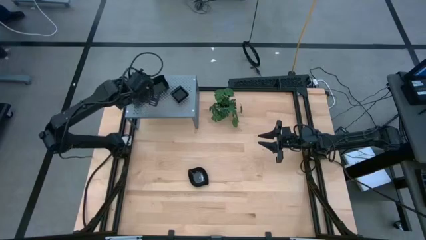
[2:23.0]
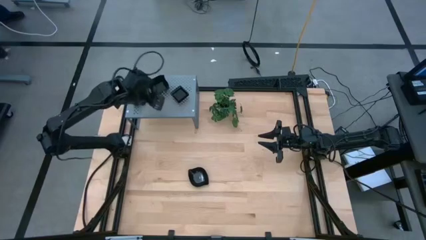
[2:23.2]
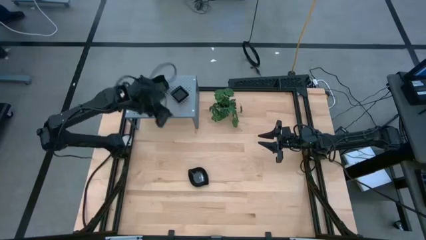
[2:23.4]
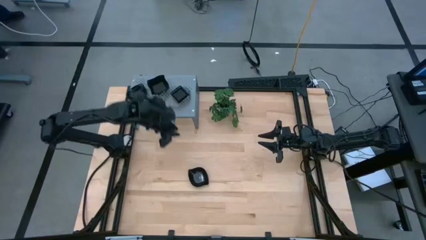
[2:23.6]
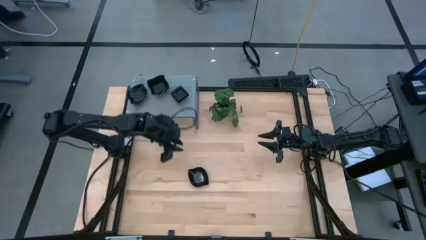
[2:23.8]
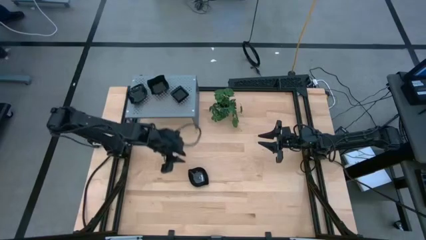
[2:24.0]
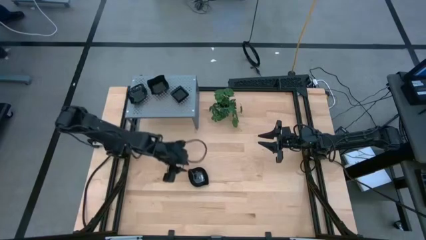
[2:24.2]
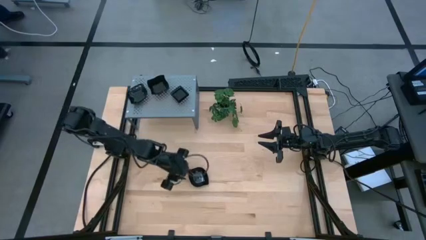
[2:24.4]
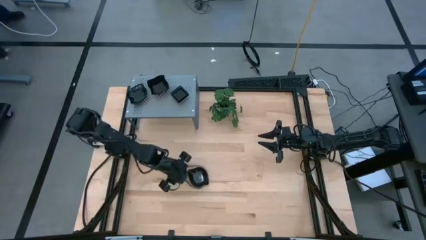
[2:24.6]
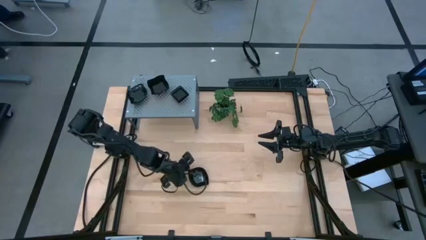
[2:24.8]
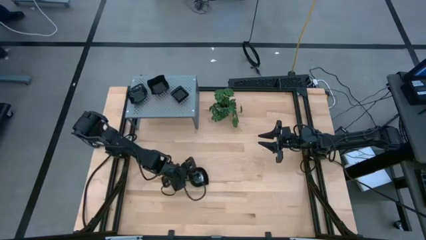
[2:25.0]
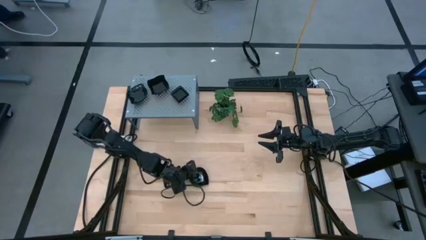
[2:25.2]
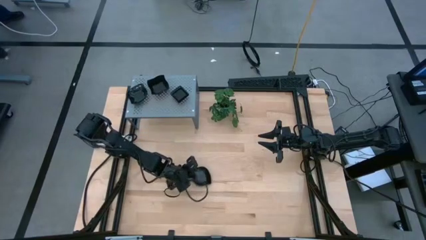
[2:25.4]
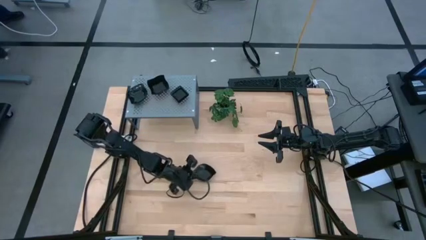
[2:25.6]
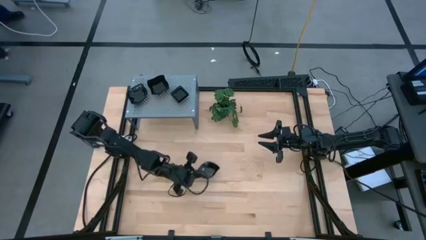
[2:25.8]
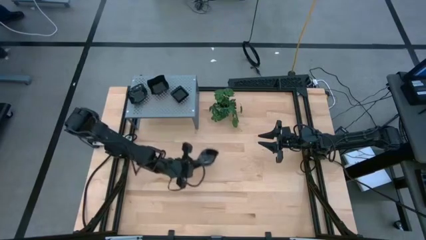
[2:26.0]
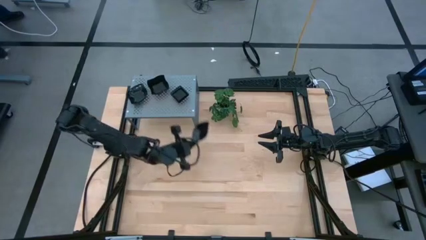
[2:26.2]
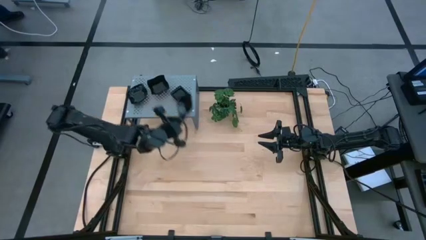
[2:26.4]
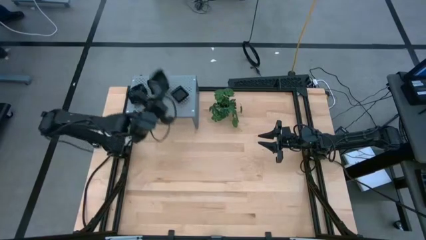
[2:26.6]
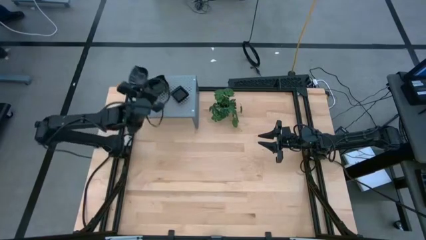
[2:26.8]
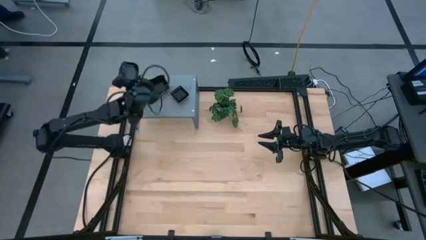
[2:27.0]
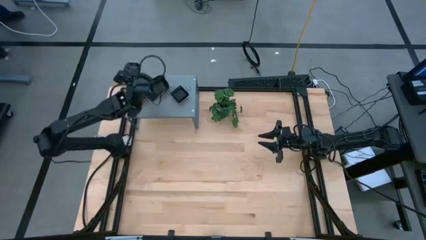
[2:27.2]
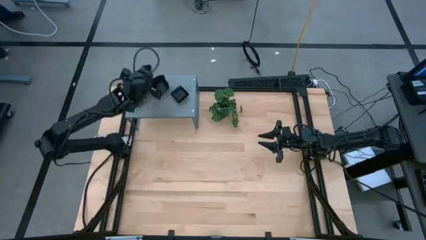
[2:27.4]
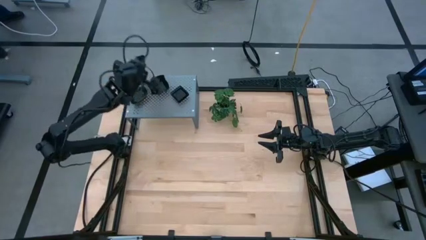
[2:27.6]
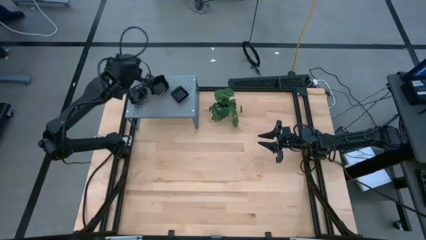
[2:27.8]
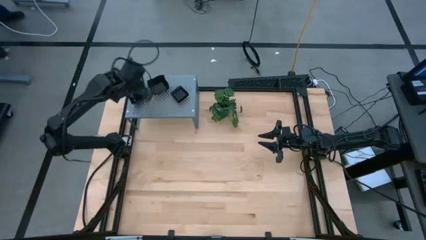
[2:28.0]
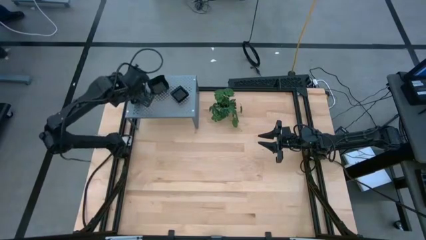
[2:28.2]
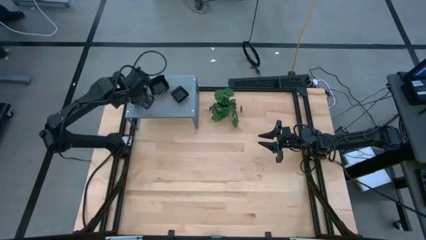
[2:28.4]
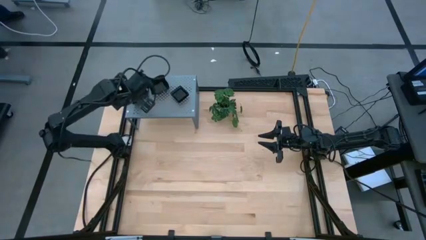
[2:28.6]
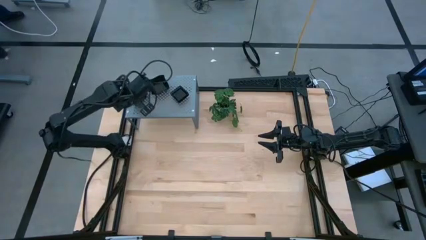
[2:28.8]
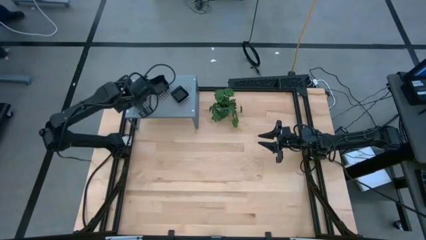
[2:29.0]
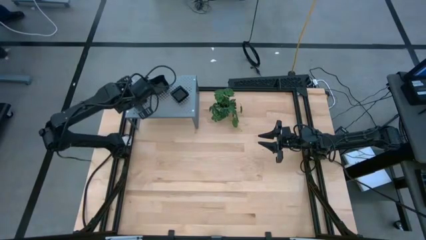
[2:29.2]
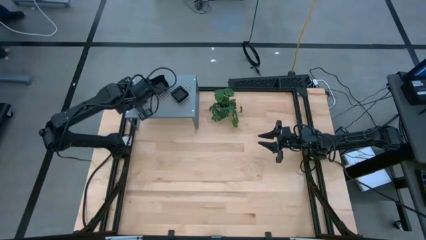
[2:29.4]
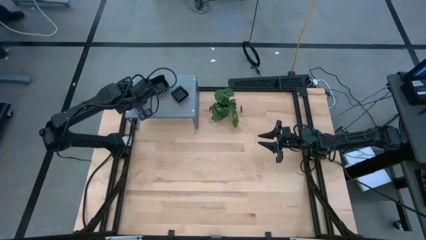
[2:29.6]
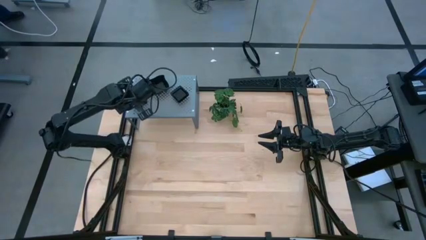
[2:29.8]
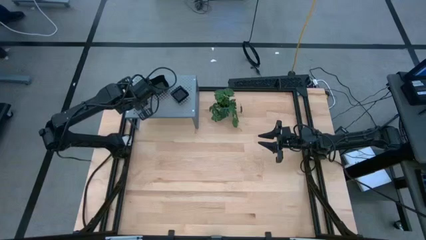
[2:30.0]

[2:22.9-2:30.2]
Task: Pick & Place Mini shaped plates
Stack the black leaf plate on top of the black leaf plate on the shelf

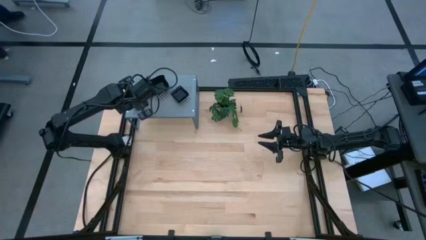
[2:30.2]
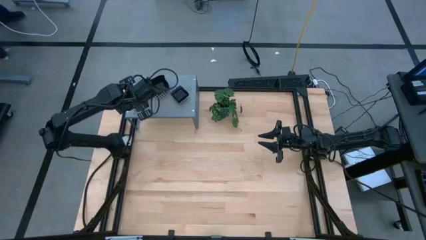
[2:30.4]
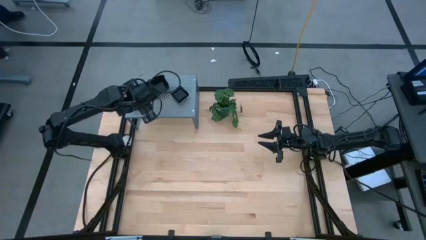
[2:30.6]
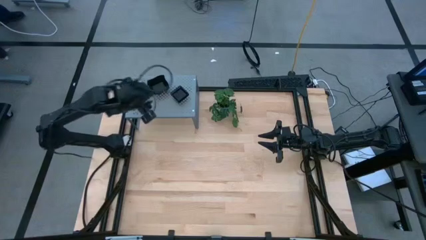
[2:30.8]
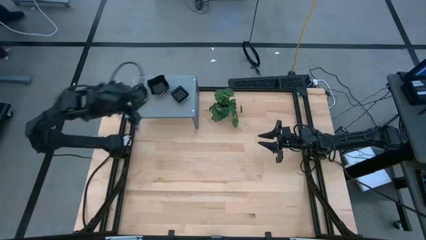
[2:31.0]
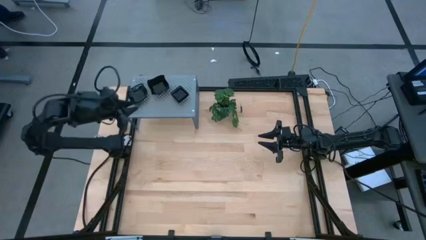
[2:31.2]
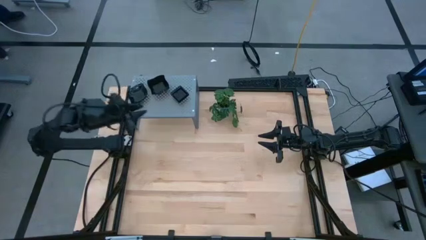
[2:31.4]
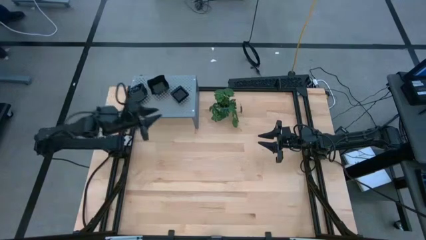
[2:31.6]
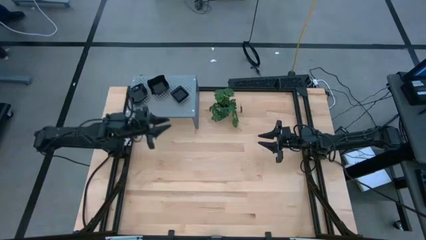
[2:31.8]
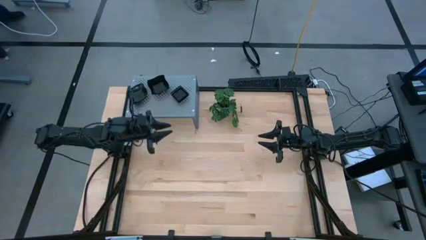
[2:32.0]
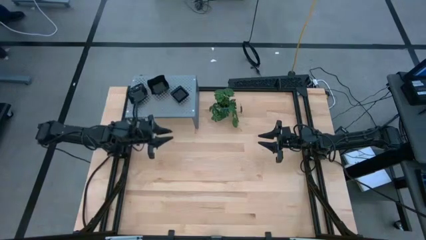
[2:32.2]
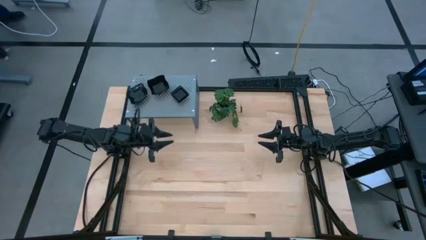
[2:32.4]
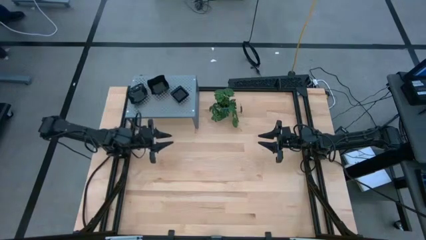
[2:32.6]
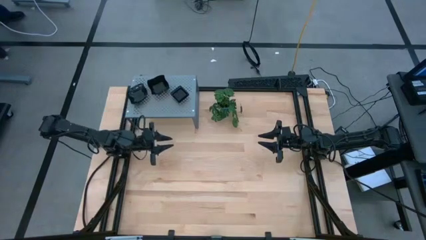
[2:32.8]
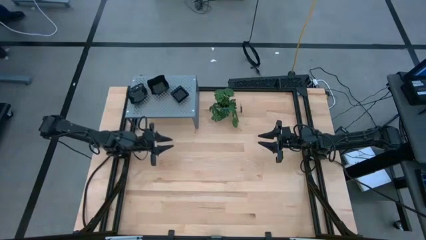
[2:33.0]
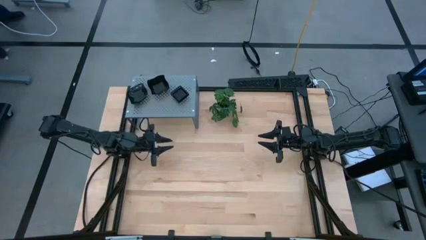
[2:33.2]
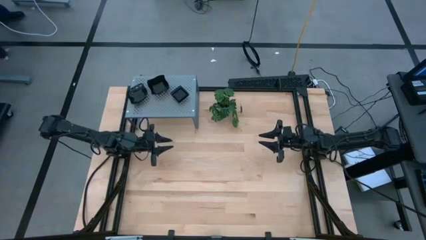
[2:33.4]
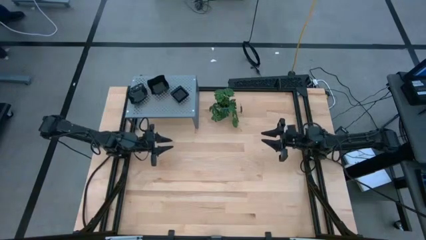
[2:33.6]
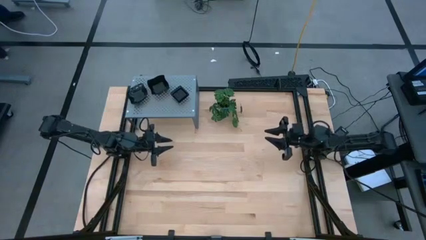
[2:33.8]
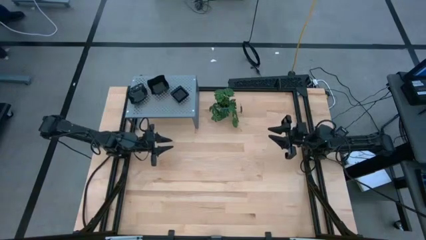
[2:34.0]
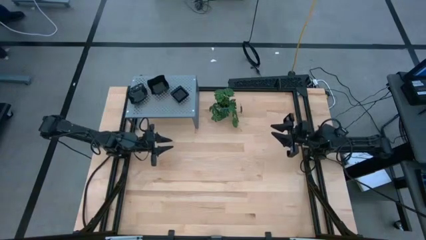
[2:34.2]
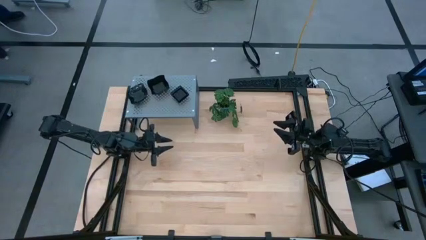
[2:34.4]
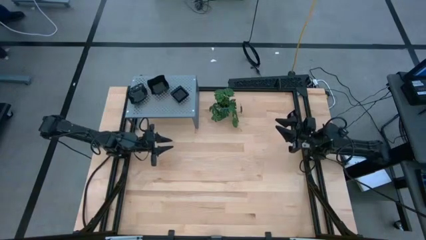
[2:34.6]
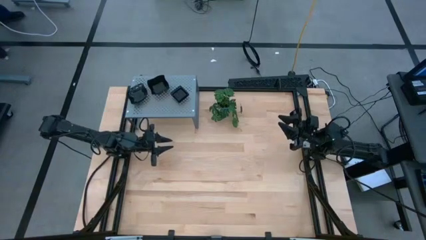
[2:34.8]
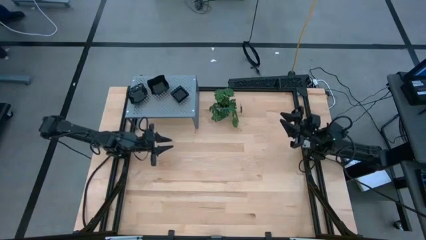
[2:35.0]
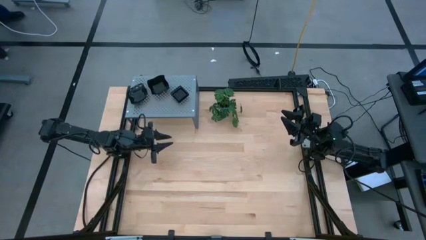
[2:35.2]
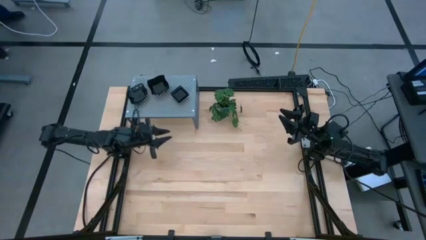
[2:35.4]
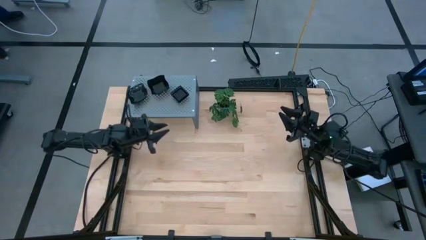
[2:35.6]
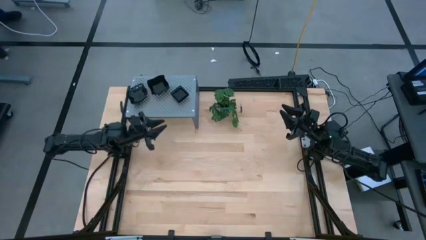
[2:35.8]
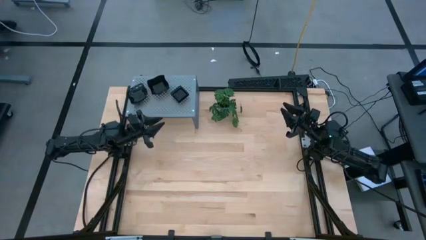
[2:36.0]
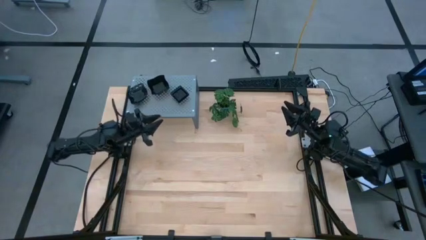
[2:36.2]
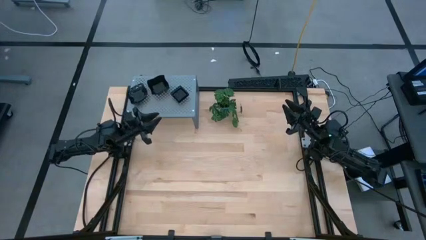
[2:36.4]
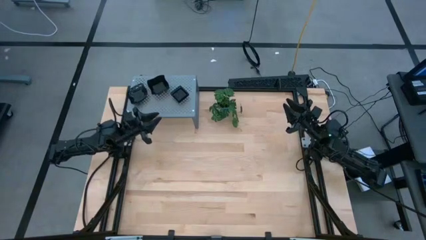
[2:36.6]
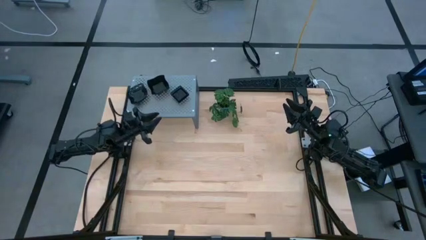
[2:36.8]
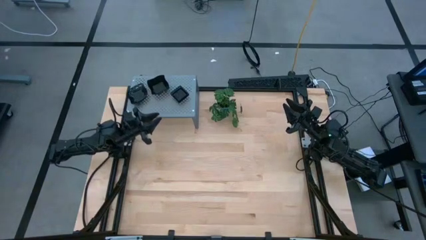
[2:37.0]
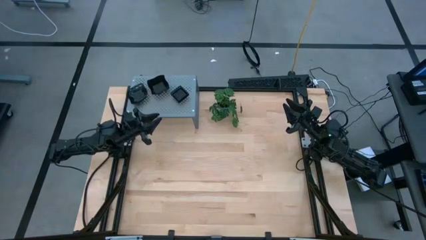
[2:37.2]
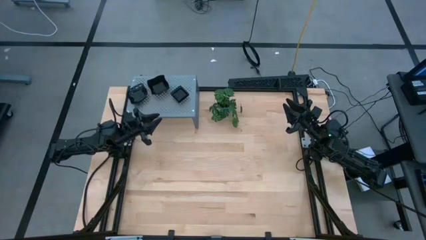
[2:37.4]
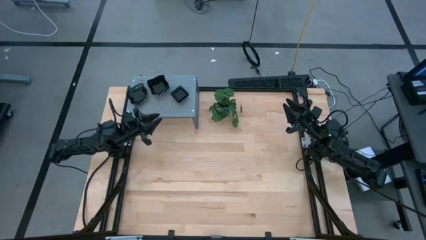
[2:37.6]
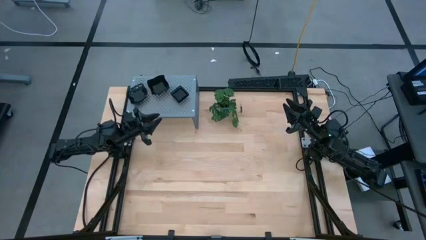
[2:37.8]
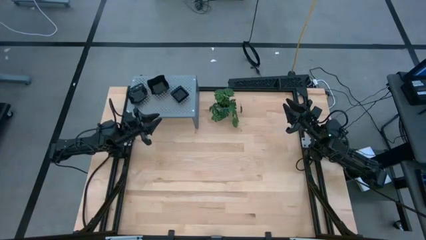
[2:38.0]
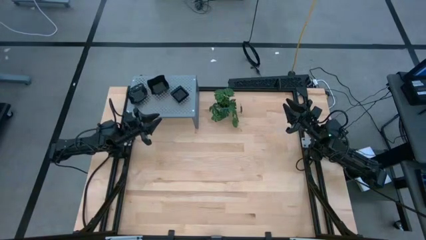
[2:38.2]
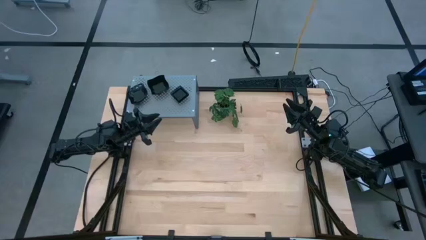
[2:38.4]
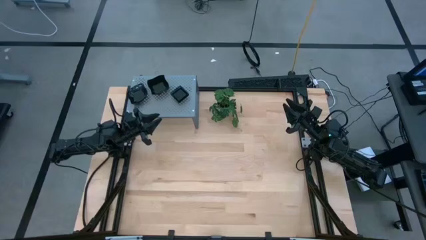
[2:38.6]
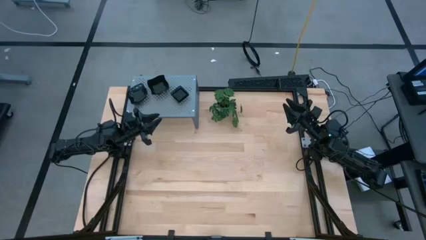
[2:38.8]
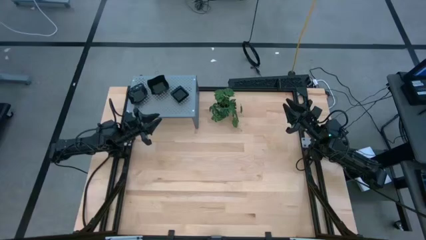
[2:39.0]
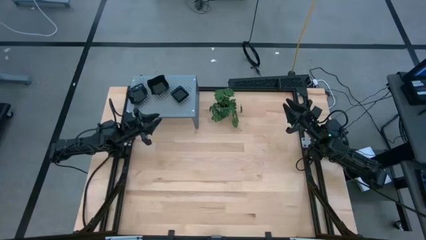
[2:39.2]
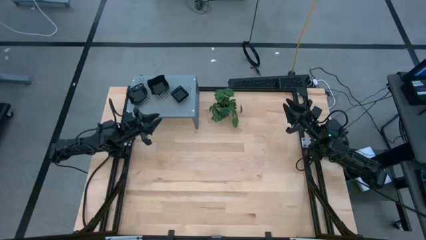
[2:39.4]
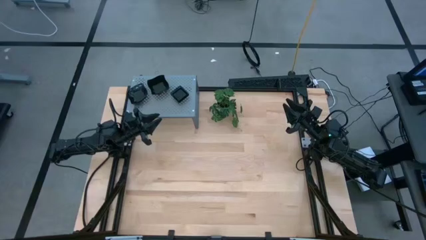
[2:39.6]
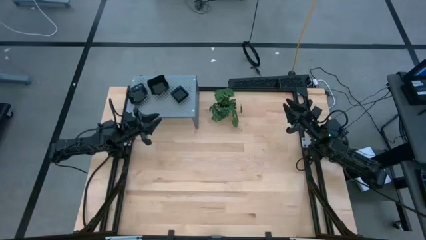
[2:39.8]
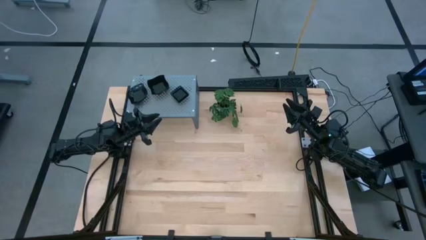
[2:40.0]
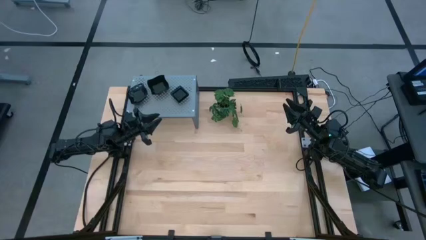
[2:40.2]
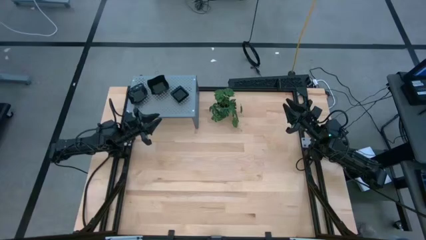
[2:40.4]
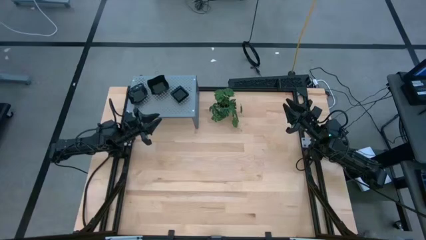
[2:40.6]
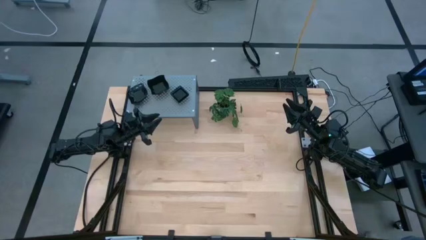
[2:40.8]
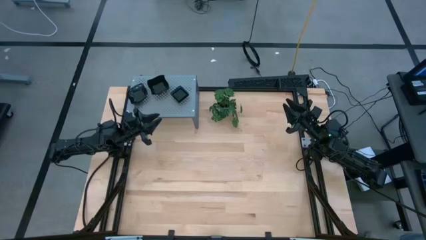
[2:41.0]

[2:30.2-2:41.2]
Return to Home Position
